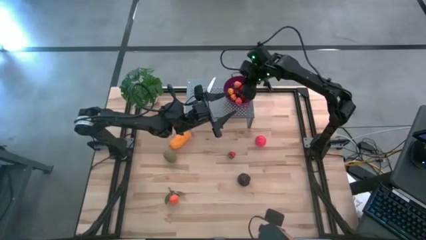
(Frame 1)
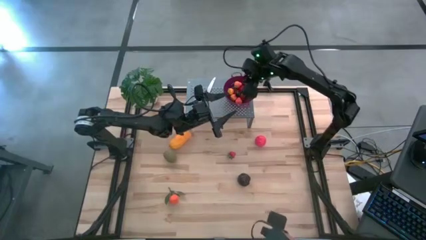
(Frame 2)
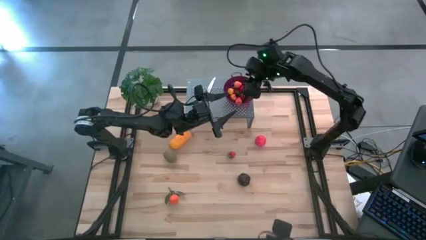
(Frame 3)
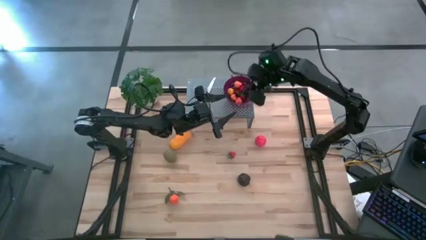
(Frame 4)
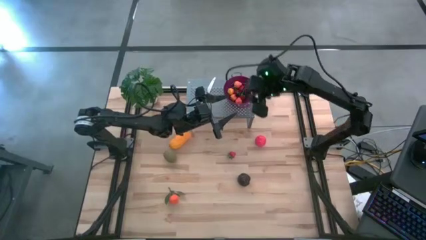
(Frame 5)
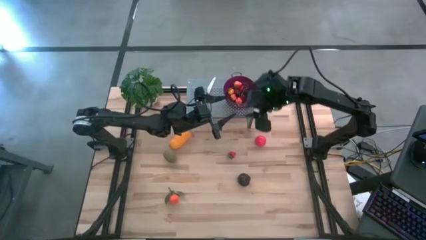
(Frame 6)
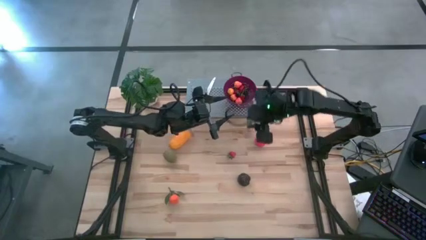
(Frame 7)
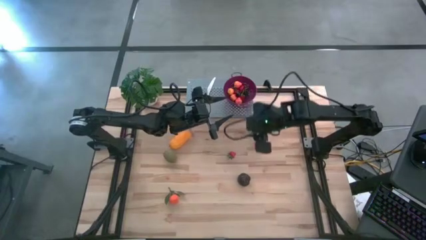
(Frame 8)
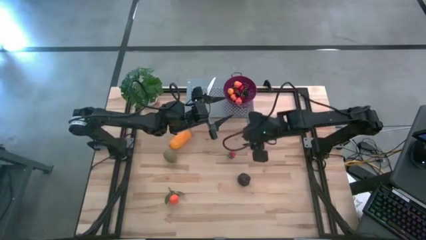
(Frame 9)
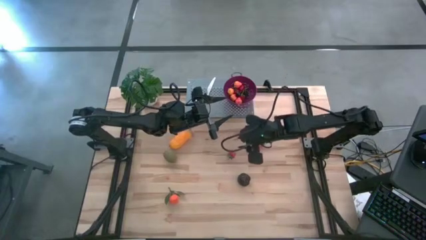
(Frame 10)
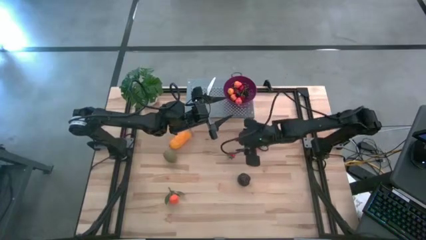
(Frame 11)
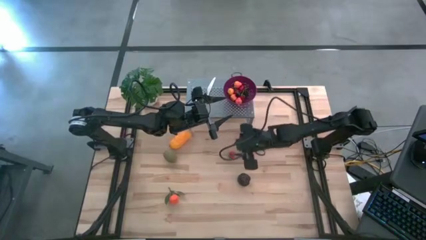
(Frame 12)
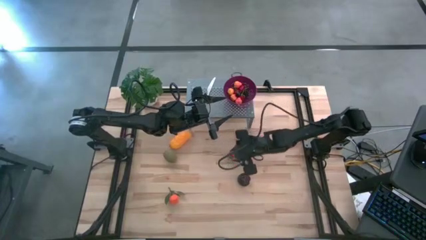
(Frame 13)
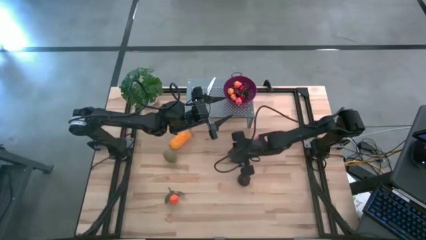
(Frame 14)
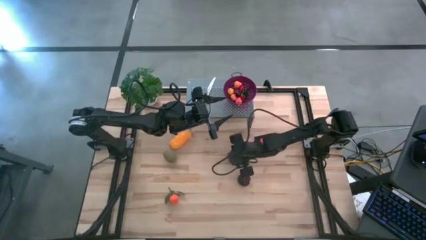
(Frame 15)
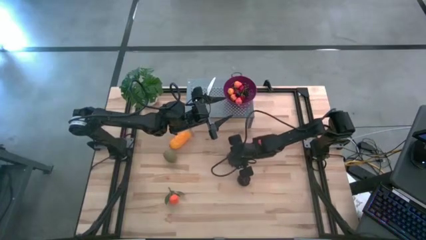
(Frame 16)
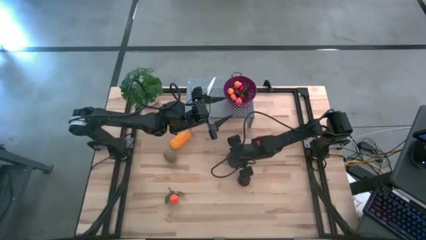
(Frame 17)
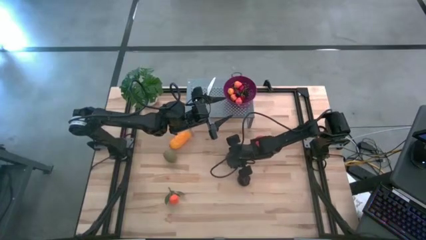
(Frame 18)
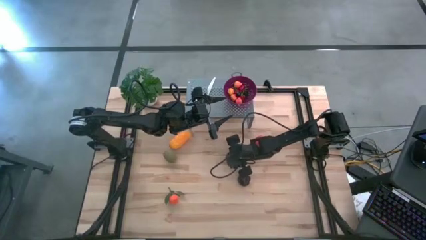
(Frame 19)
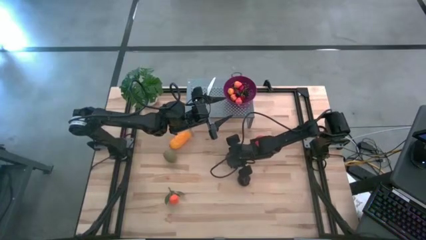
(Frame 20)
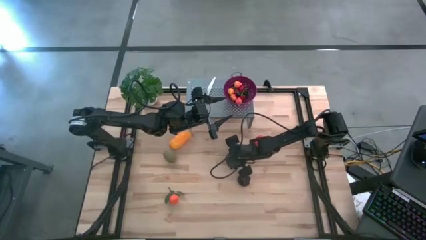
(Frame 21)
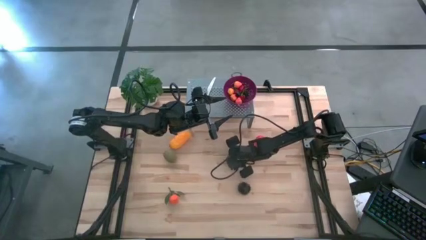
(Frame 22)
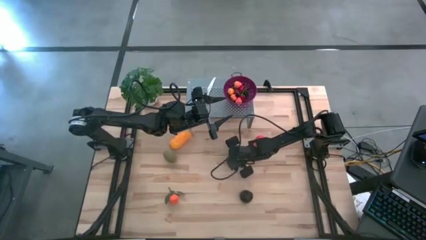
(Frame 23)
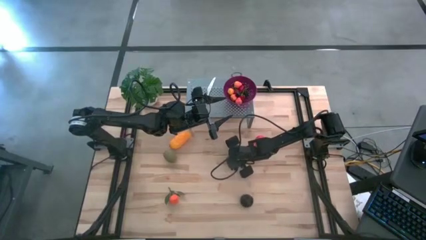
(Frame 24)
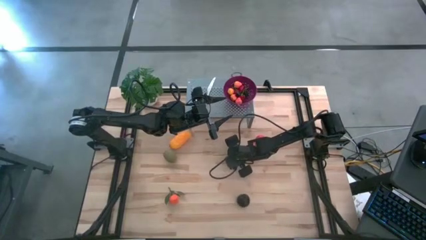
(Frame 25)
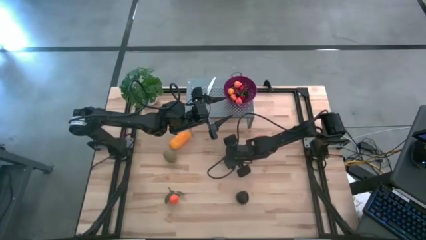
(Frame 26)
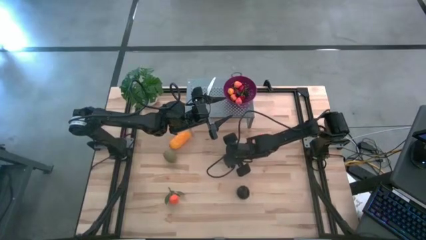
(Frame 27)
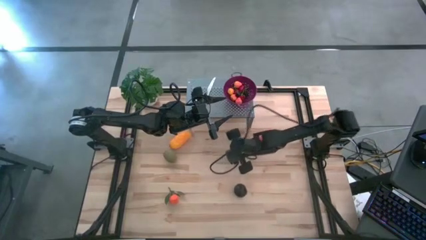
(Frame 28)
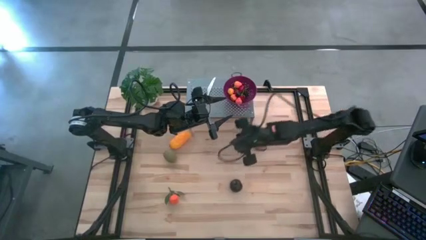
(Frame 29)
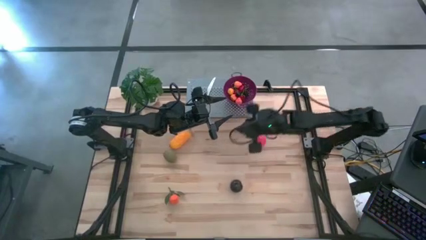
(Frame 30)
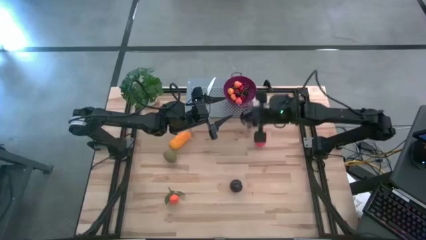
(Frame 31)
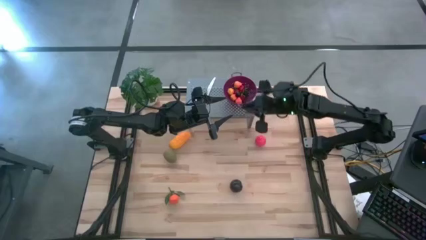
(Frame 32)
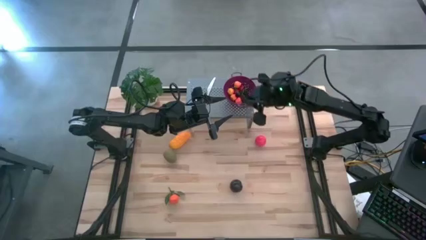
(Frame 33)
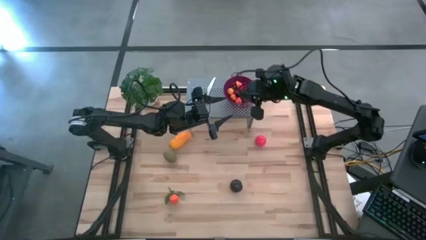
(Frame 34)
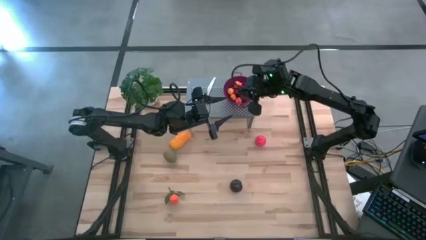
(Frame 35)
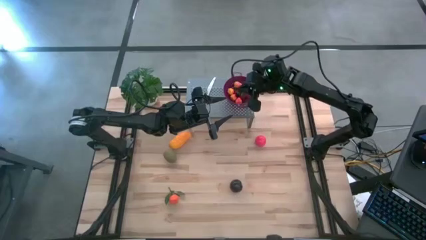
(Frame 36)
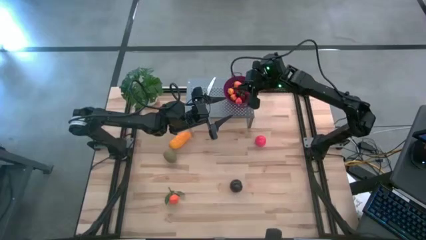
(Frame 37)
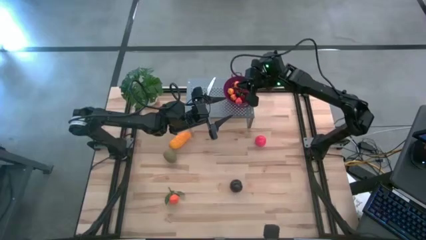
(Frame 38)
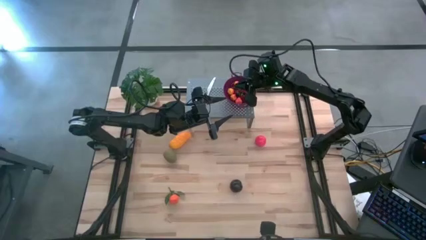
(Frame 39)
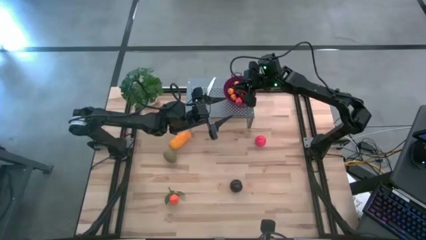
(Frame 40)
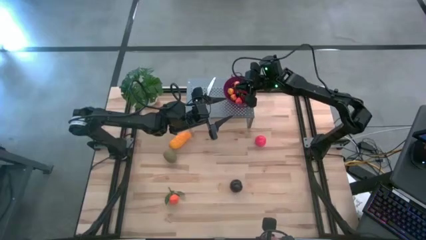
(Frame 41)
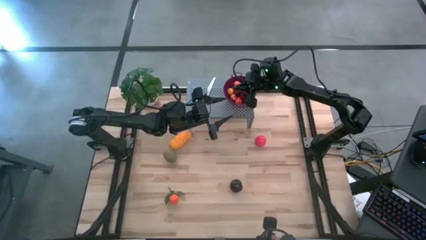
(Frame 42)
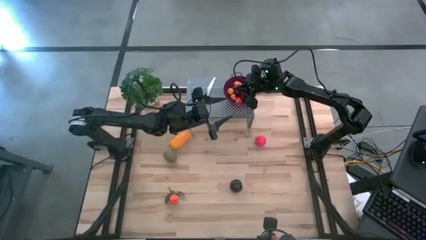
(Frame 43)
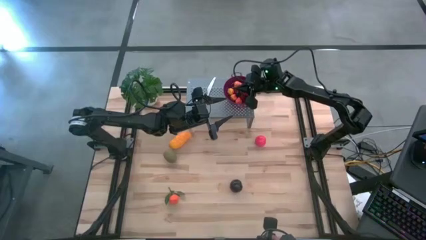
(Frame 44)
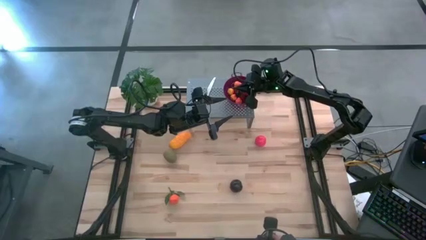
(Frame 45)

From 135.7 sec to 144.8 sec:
Task: Pick & Place Fruit
Put the red strawberry into the violet strainer bowl on the shelf

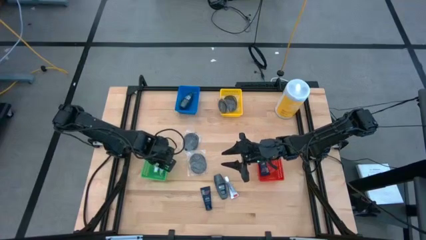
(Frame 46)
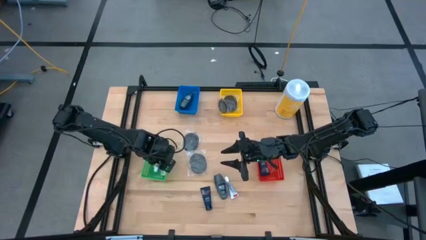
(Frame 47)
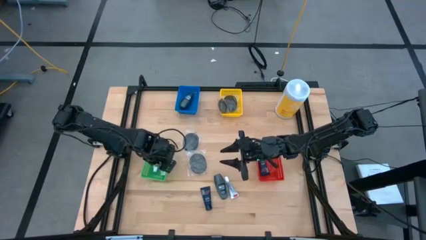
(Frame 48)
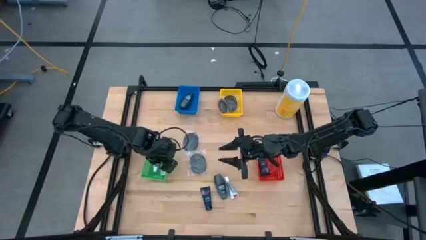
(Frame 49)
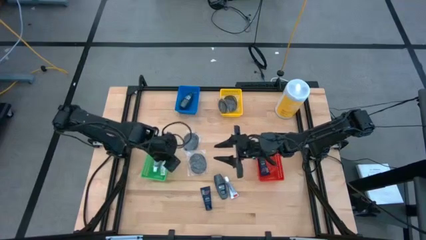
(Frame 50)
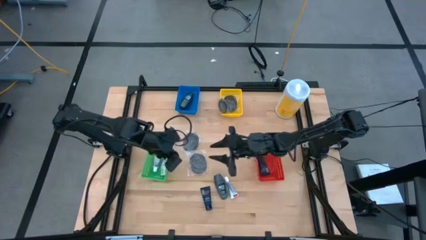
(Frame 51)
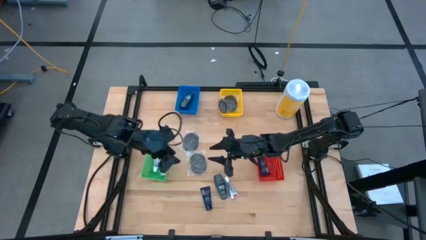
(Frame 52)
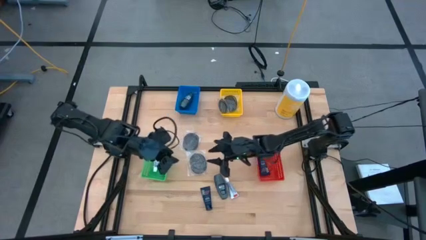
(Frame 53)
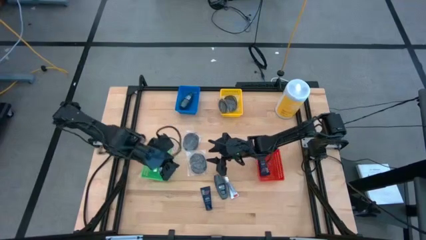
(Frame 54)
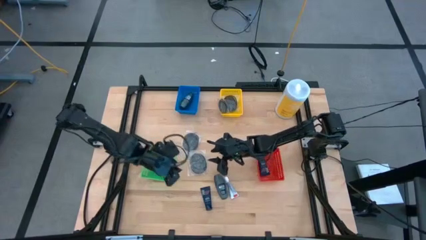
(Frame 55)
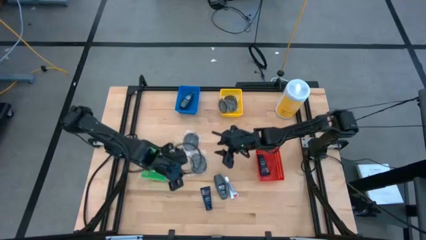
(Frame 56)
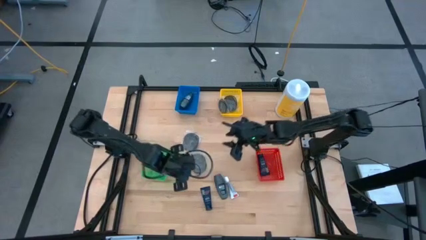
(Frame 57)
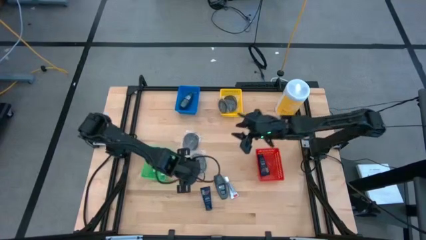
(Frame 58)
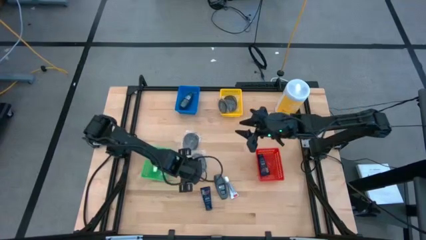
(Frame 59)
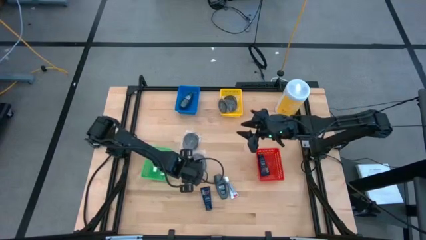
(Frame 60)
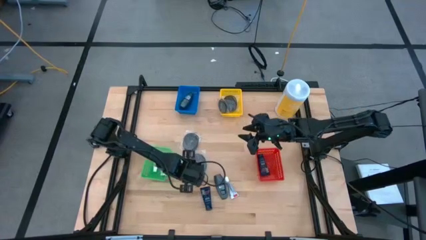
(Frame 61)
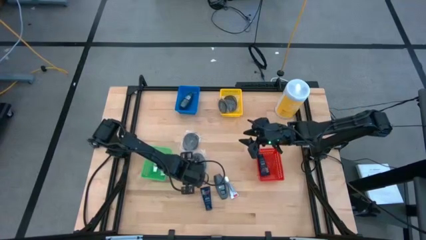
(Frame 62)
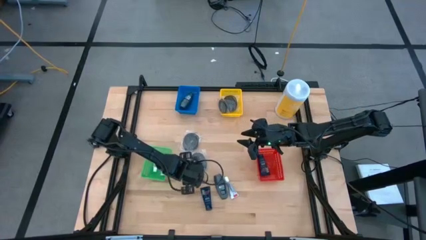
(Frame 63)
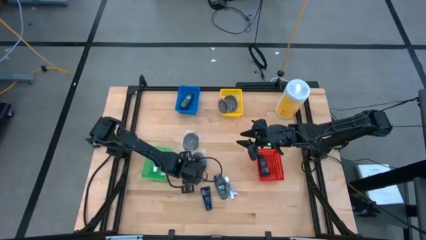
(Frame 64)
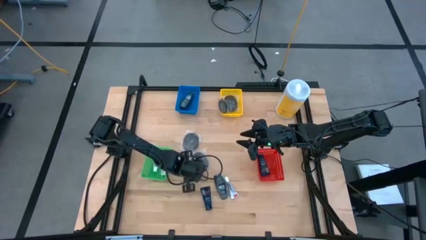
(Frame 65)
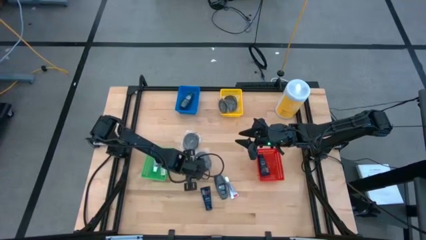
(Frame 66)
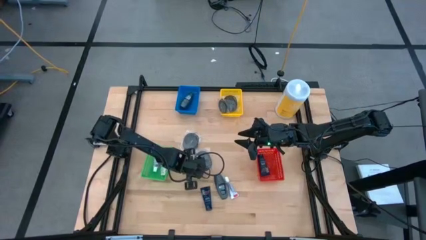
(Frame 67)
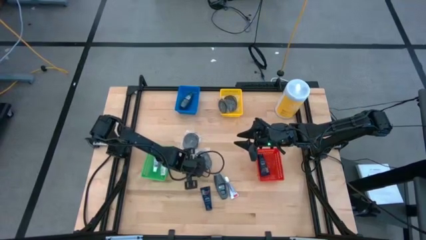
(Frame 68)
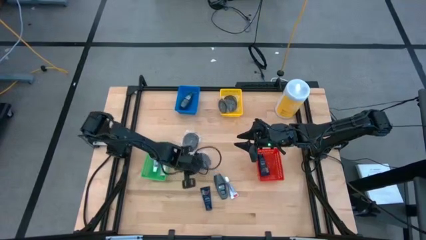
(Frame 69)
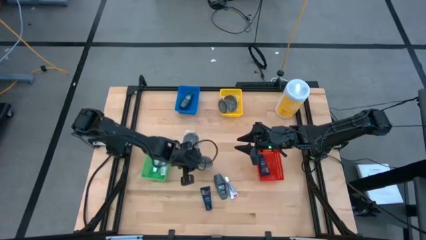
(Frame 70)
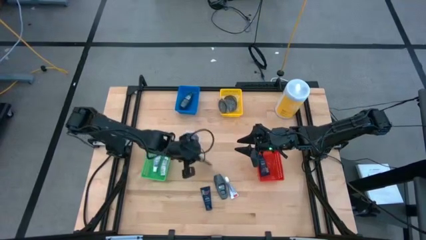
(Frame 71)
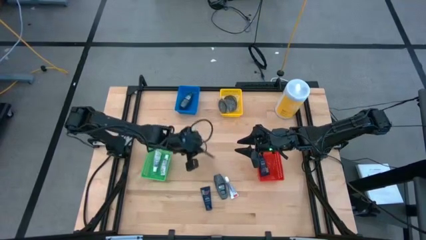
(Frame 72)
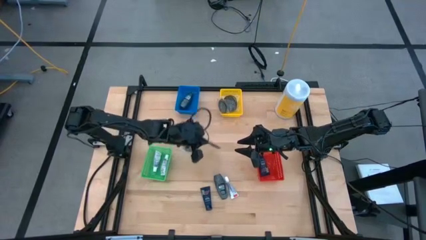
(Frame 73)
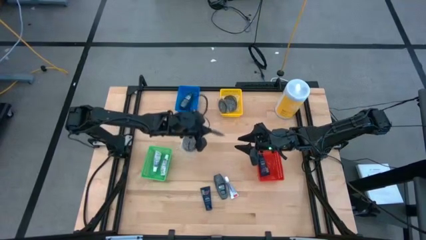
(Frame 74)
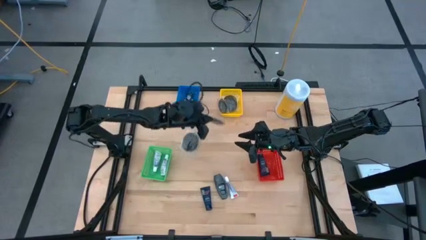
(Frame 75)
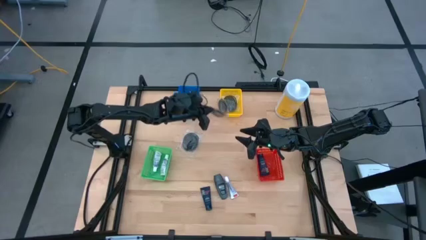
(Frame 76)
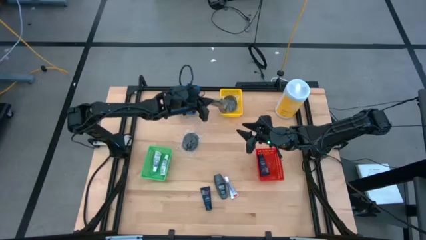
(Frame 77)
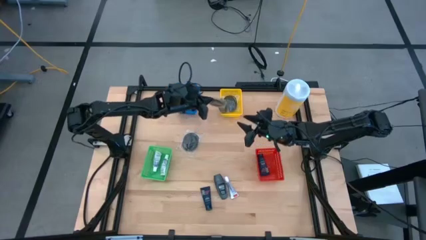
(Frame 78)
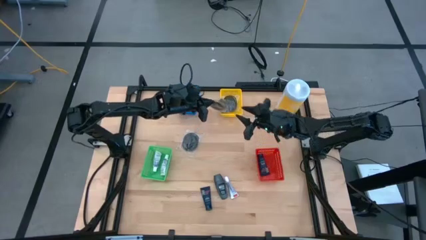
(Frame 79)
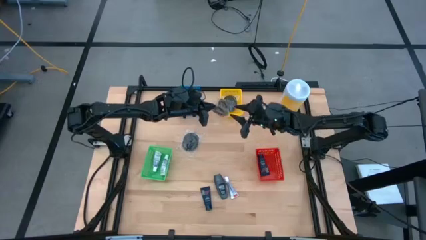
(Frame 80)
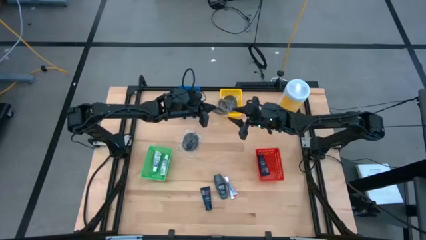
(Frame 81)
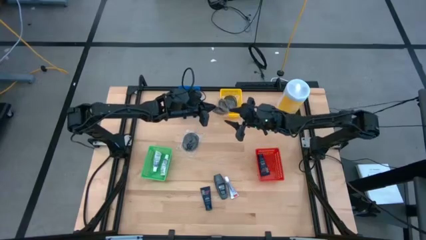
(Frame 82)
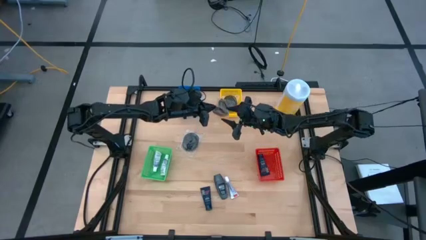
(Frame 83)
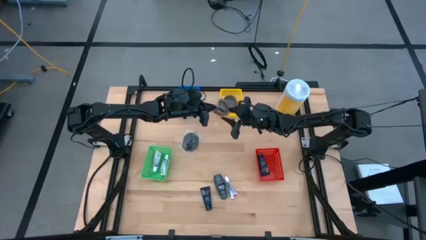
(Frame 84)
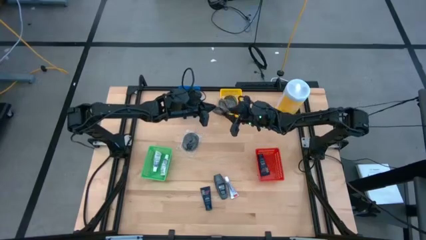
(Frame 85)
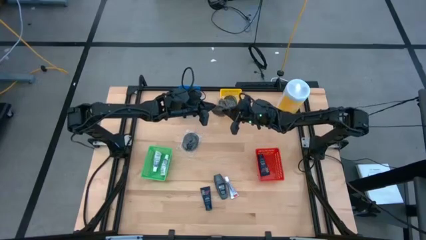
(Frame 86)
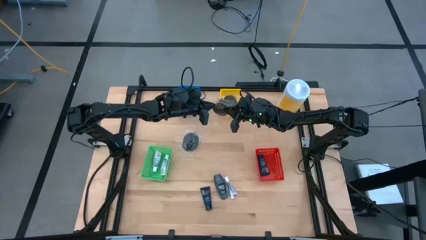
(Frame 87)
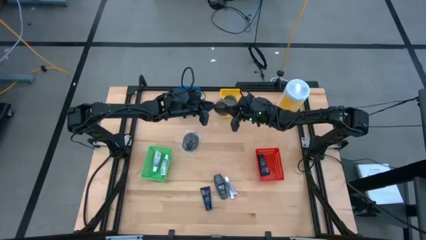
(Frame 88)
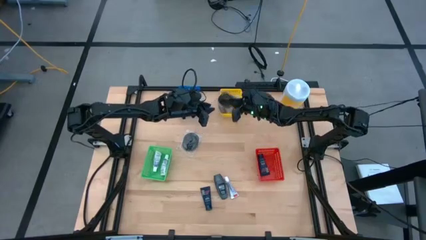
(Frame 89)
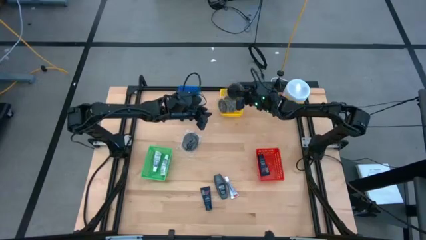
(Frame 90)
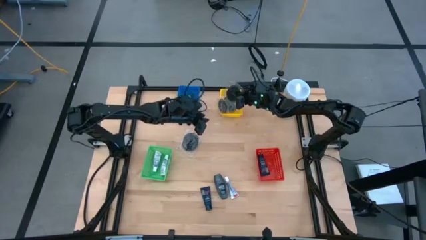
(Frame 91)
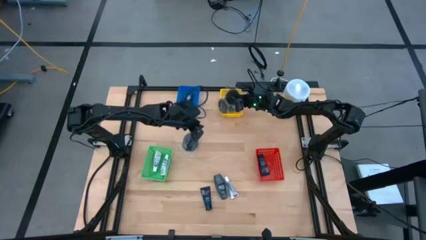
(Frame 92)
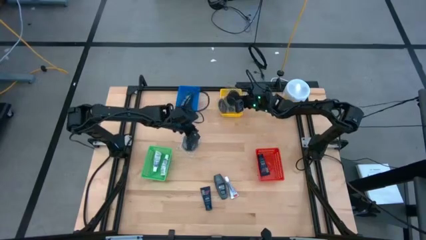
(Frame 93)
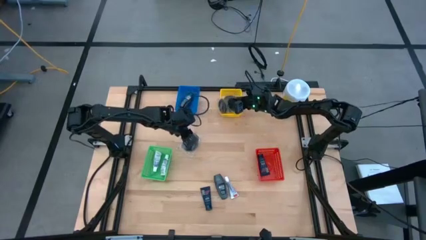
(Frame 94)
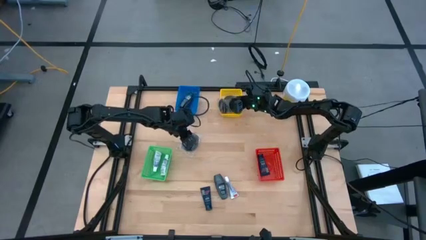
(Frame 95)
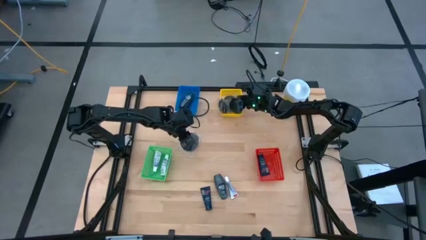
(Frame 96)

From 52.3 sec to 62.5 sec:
Task: Pick & Place Travel size toiletries
Put the black hairbrush into the yellow bin
